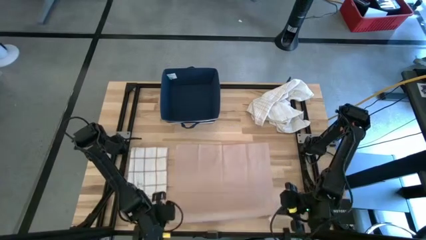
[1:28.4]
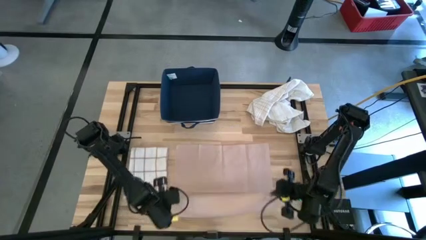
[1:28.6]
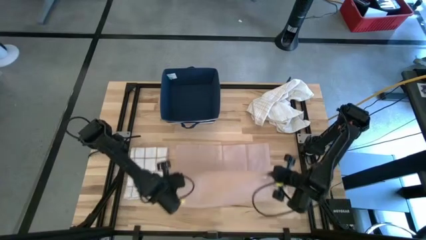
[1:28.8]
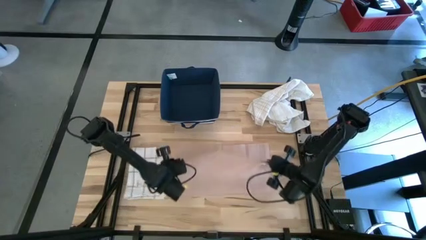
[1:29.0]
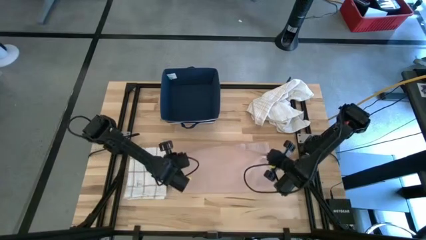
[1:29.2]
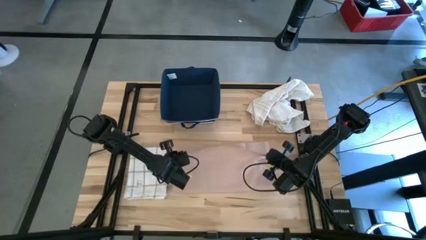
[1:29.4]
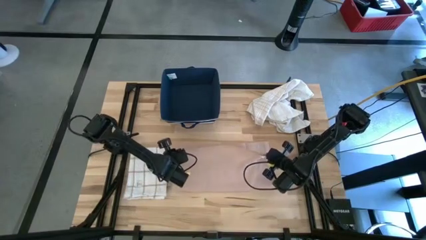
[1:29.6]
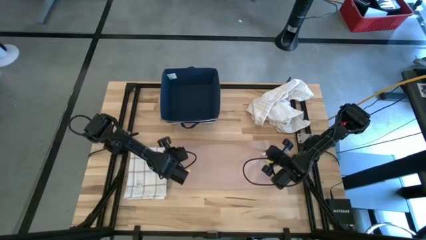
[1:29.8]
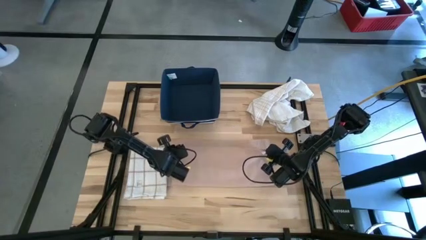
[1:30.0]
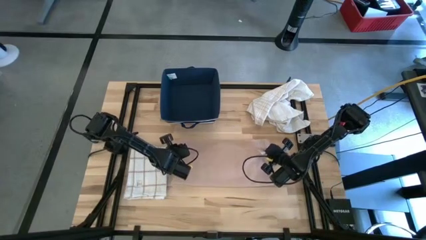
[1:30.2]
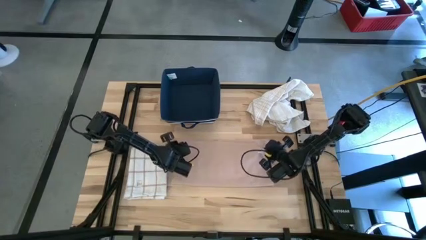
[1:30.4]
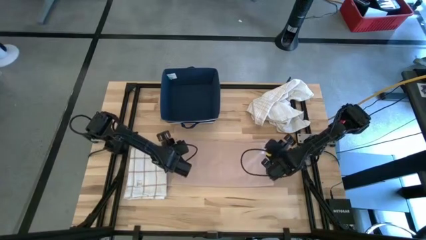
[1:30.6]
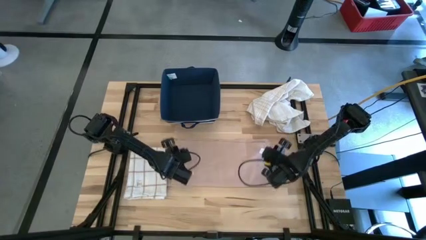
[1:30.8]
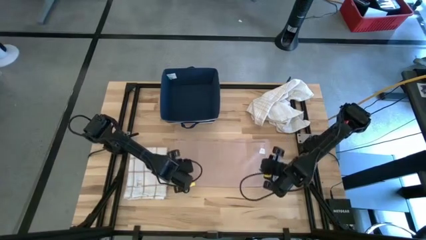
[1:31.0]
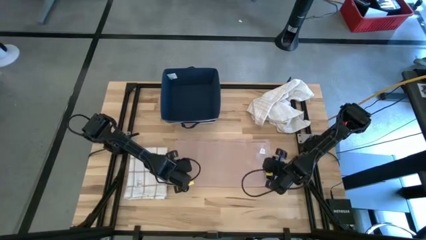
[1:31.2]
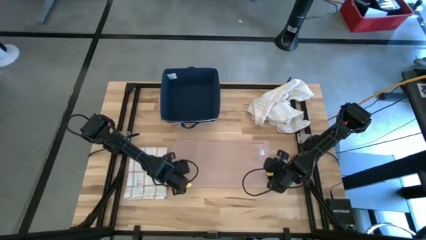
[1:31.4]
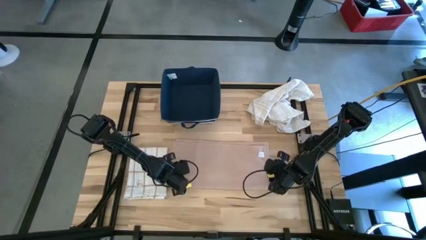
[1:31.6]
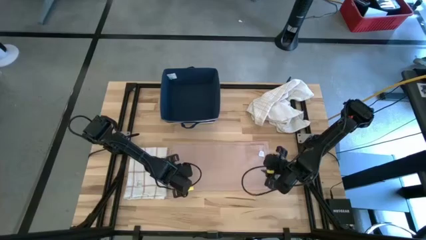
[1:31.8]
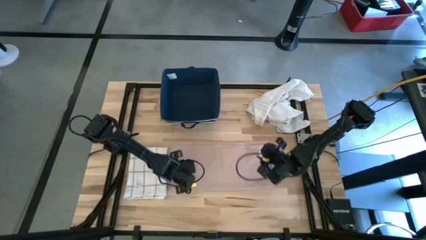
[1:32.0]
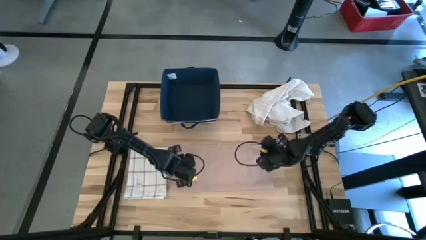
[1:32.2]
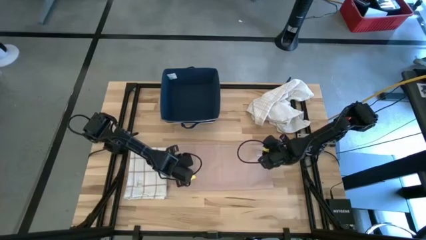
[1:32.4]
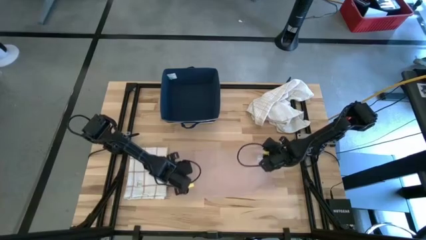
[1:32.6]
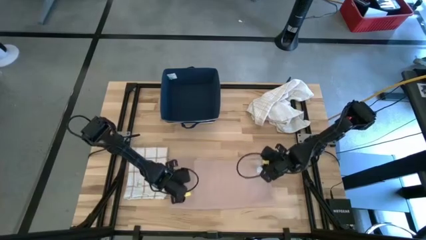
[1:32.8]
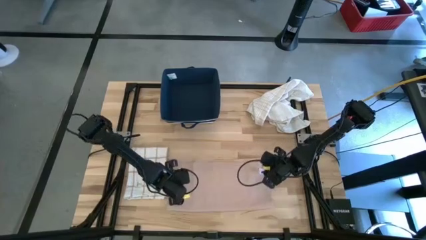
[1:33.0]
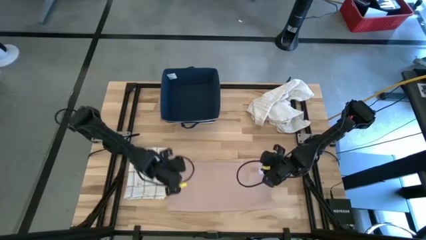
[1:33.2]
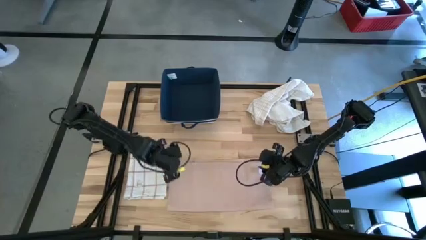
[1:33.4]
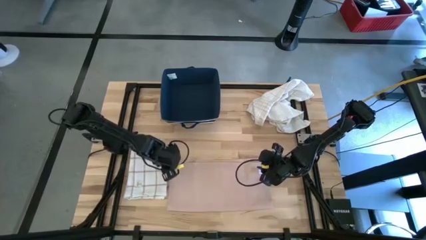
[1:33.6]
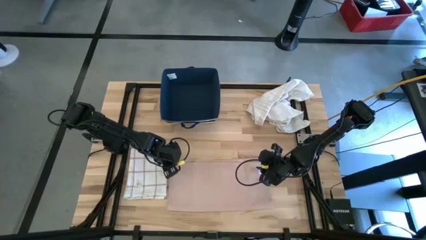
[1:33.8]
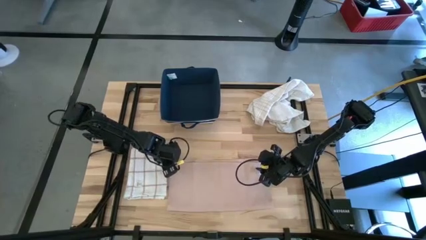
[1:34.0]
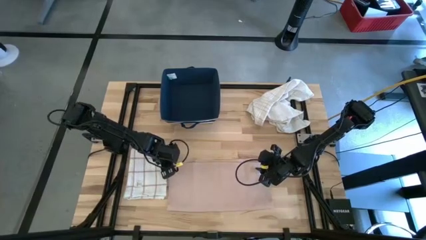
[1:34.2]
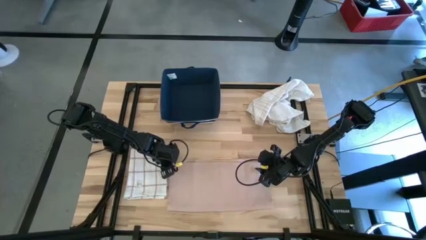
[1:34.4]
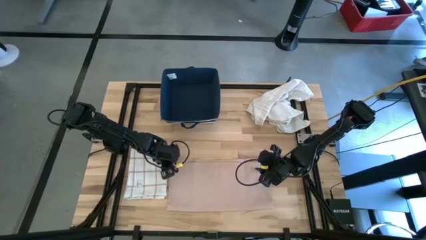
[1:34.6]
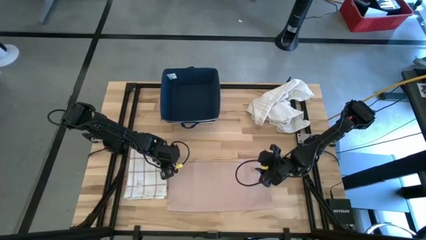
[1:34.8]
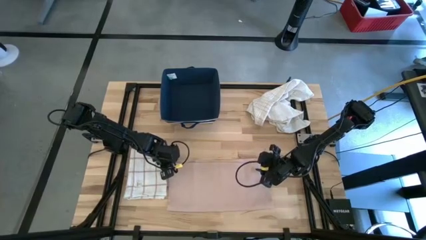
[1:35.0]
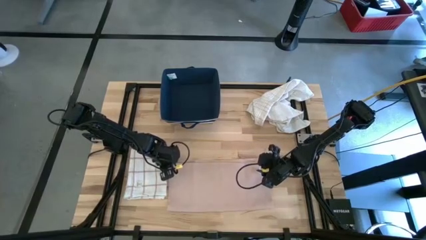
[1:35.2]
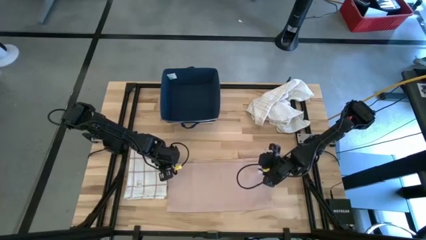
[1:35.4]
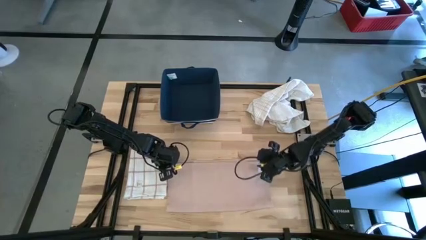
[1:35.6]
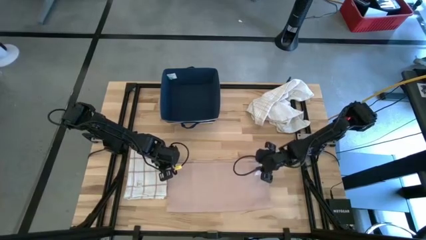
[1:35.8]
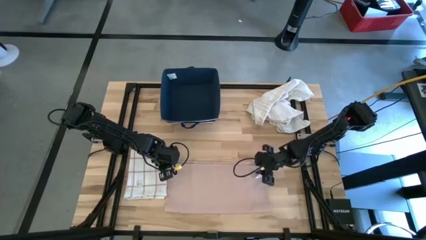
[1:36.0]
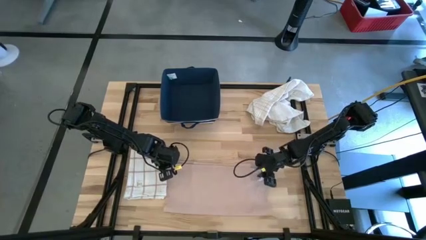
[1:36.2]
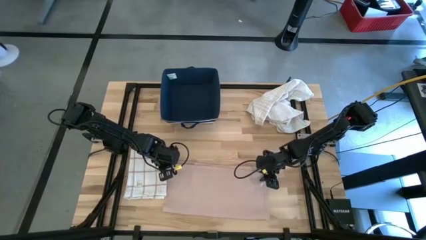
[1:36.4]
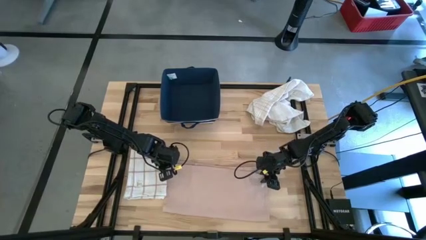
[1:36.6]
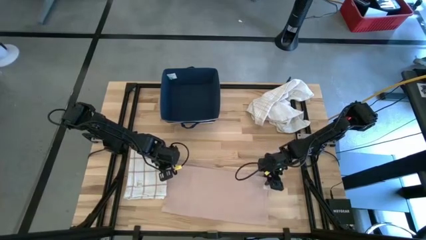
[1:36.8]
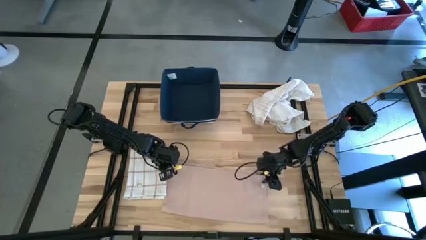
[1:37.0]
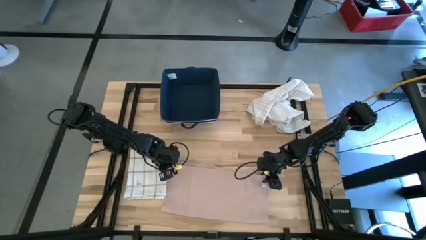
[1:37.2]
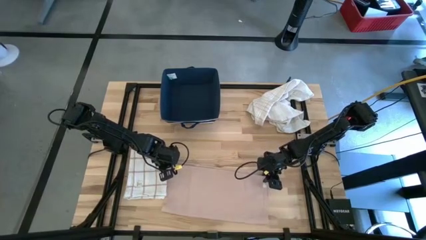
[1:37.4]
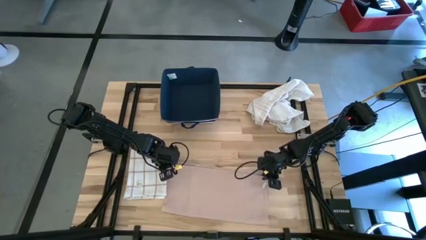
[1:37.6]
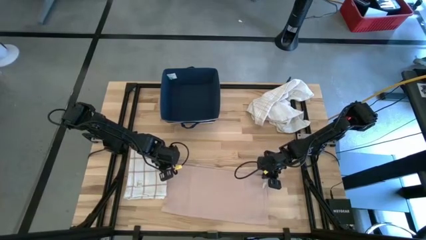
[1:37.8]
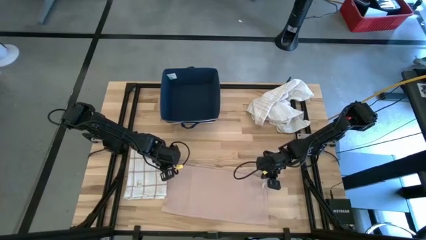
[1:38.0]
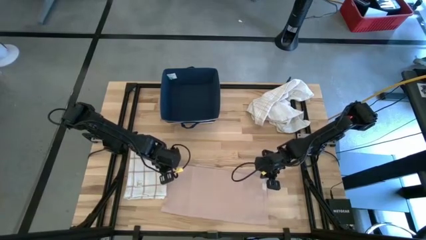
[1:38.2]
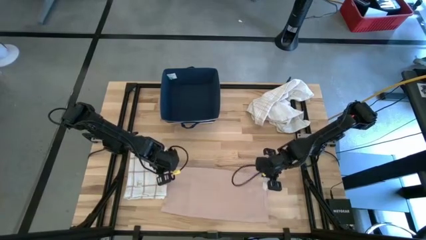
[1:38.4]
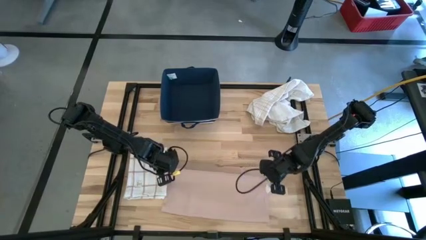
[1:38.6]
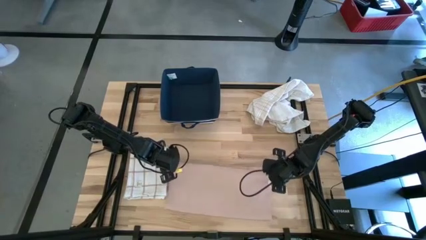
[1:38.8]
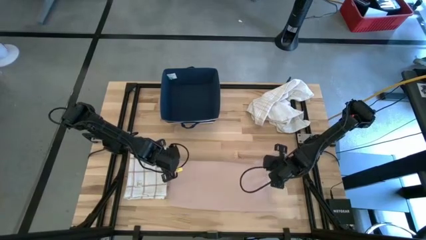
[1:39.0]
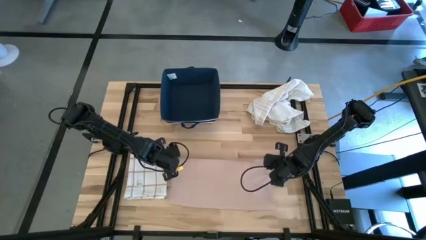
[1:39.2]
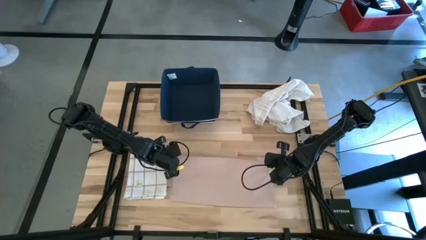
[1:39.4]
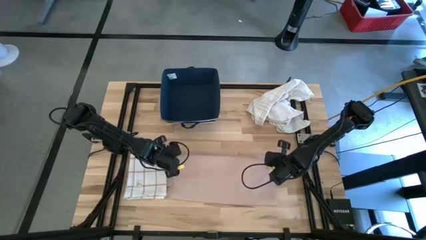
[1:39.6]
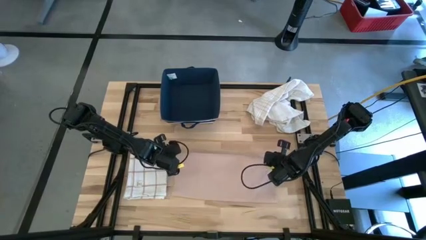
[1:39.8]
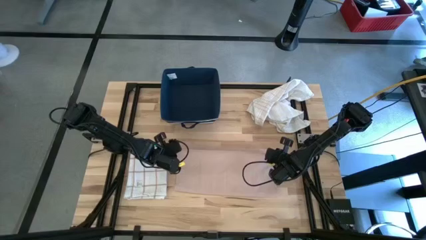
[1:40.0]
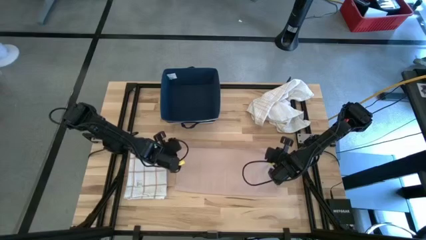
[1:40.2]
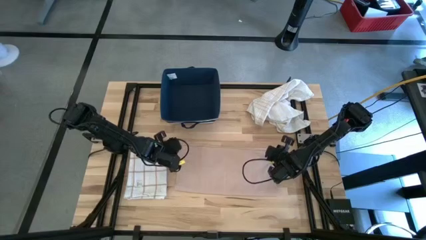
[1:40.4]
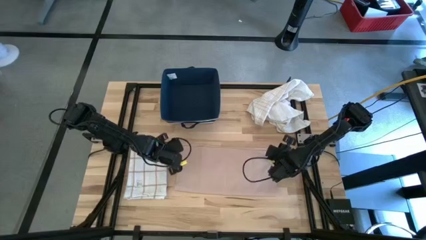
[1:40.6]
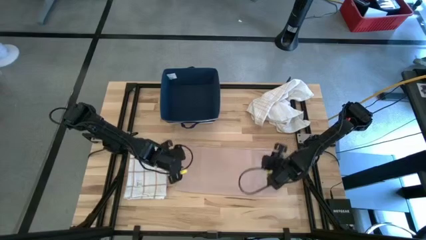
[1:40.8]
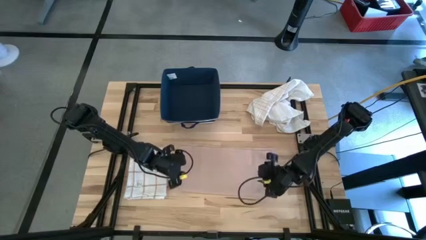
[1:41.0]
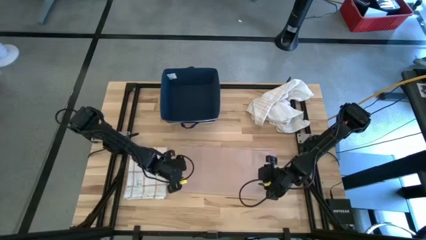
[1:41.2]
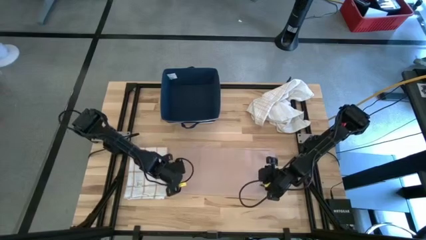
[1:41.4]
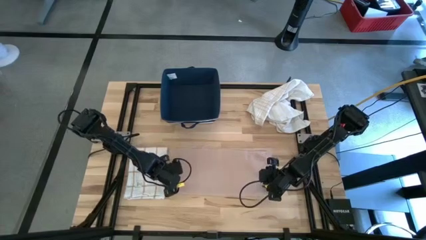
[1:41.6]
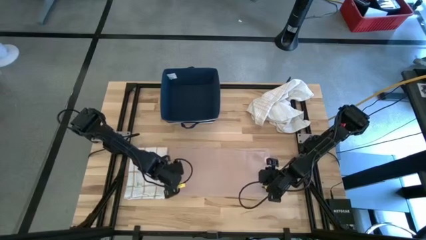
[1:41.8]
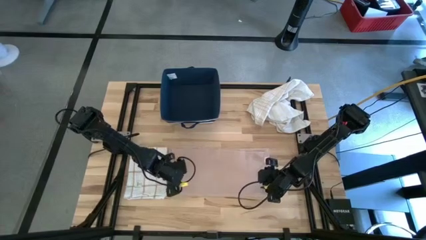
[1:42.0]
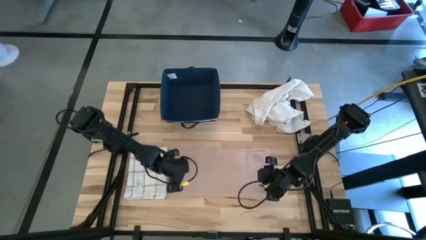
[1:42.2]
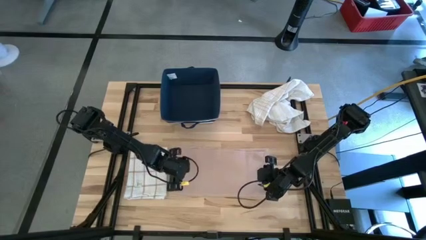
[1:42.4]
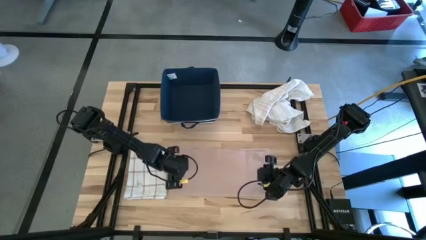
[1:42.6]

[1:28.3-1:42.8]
Task: Fold towel
Fold the light brown towel
